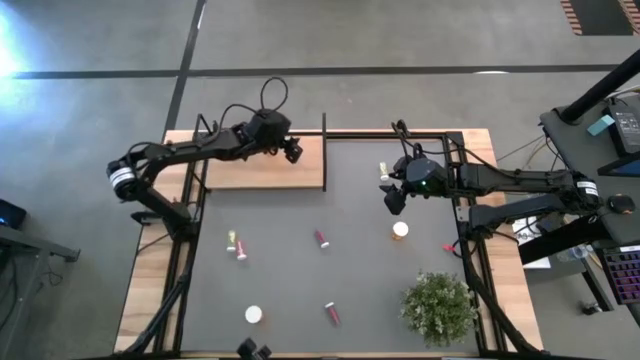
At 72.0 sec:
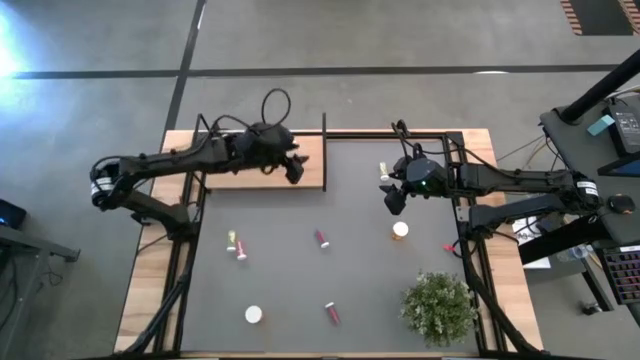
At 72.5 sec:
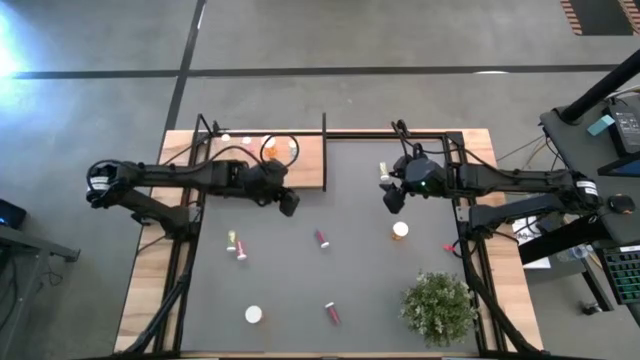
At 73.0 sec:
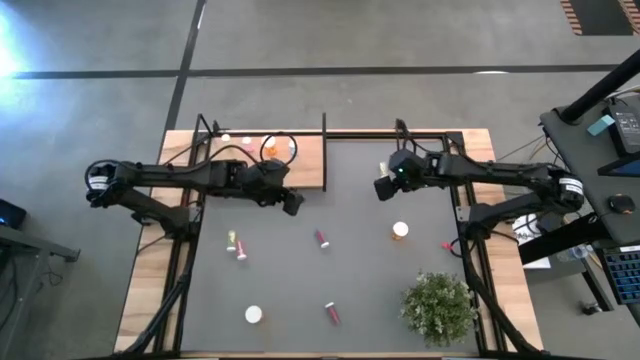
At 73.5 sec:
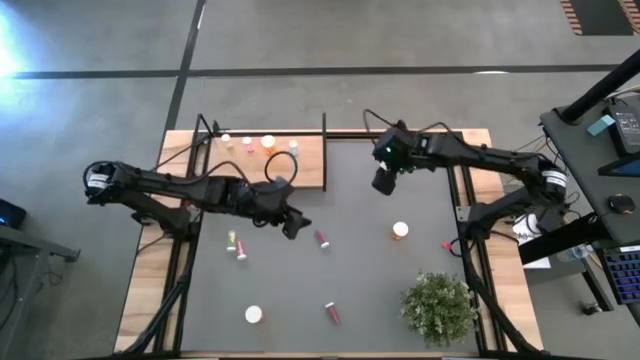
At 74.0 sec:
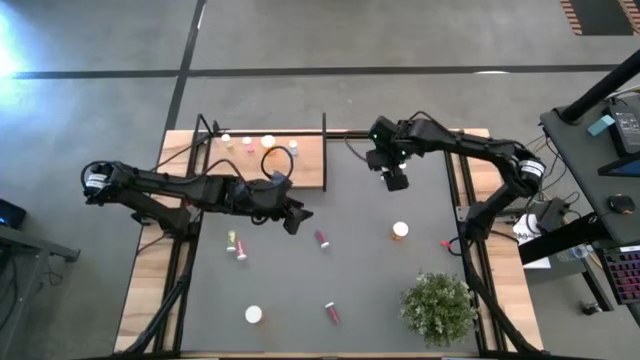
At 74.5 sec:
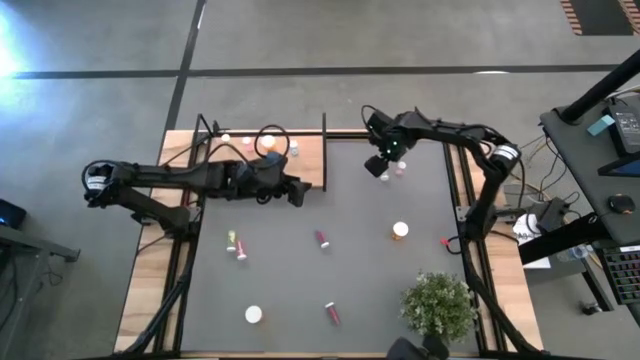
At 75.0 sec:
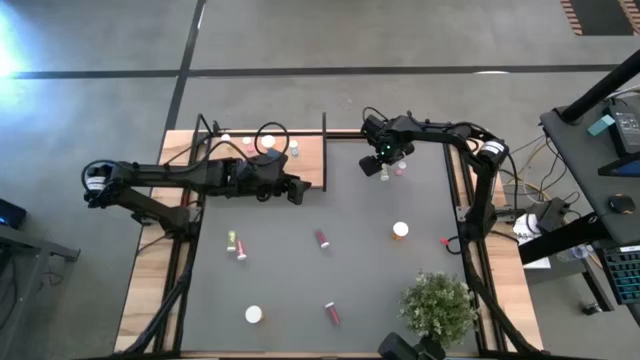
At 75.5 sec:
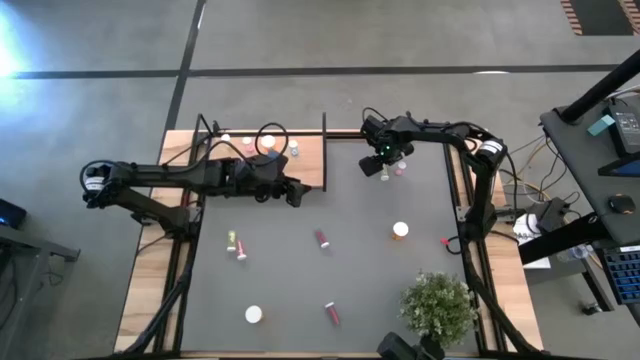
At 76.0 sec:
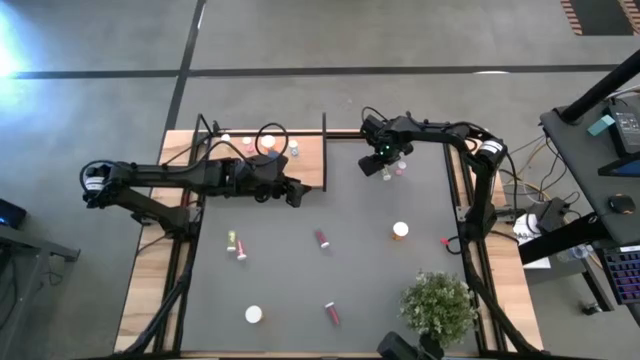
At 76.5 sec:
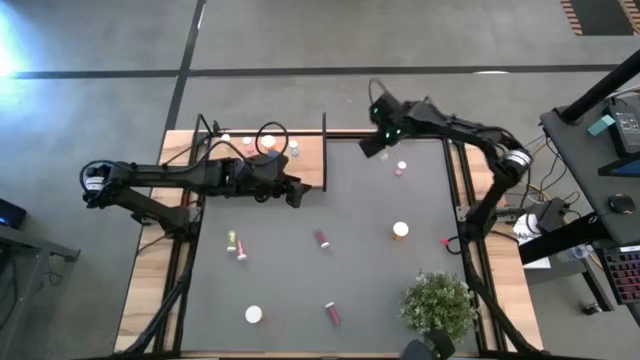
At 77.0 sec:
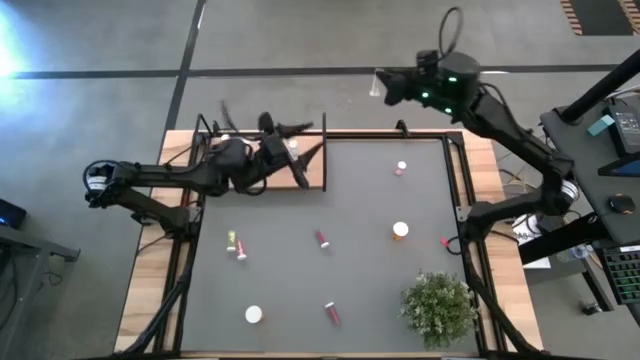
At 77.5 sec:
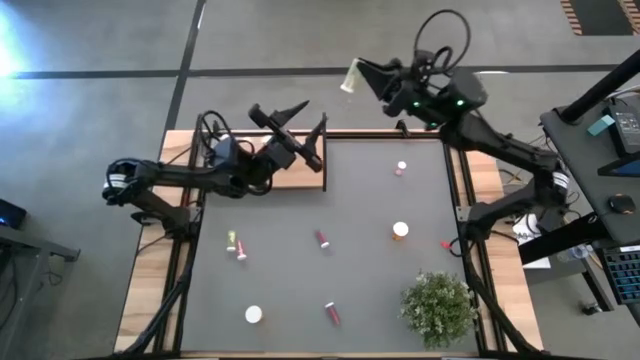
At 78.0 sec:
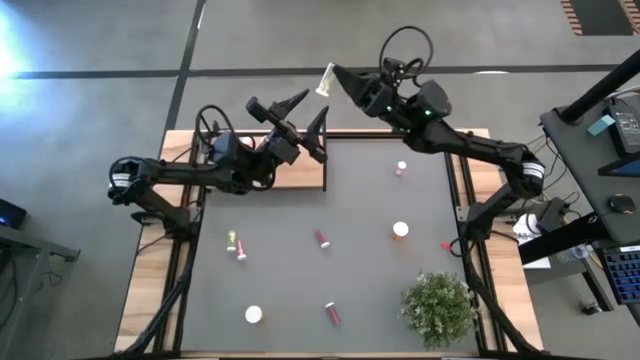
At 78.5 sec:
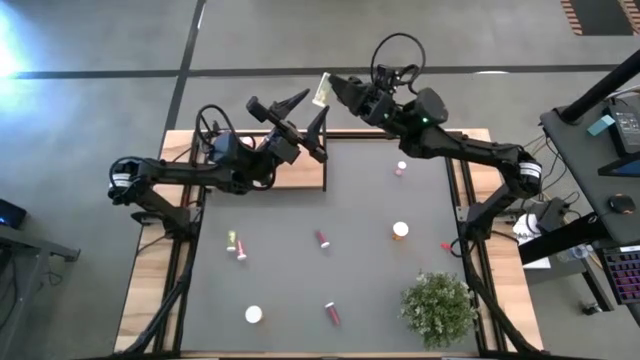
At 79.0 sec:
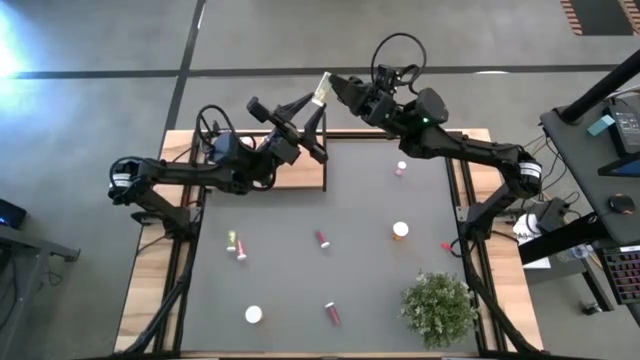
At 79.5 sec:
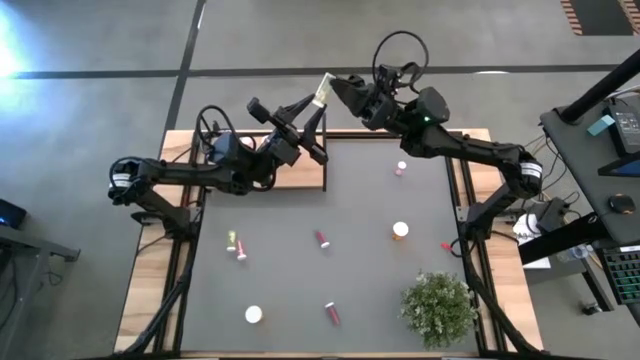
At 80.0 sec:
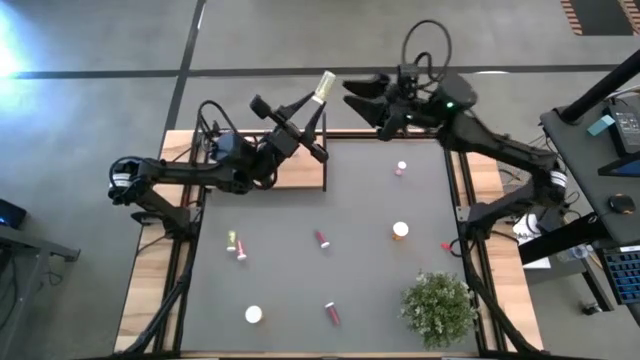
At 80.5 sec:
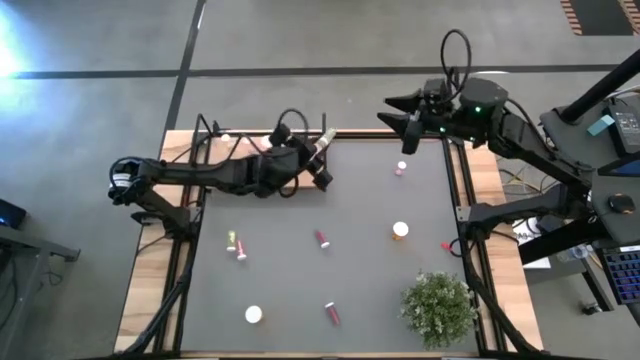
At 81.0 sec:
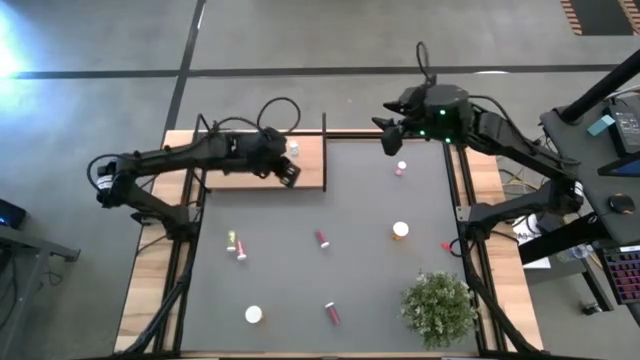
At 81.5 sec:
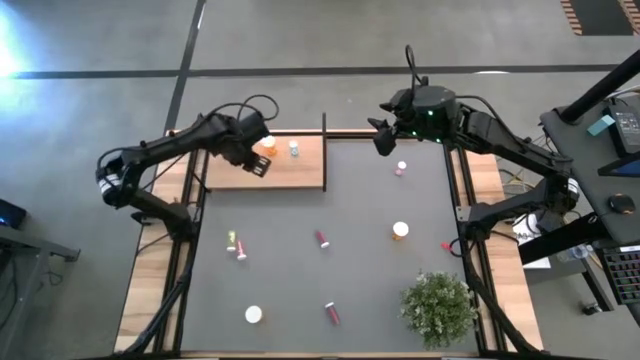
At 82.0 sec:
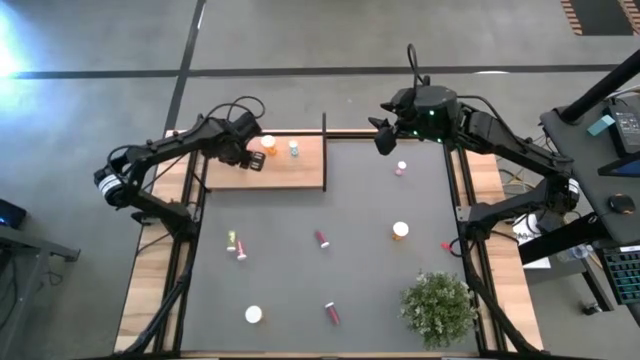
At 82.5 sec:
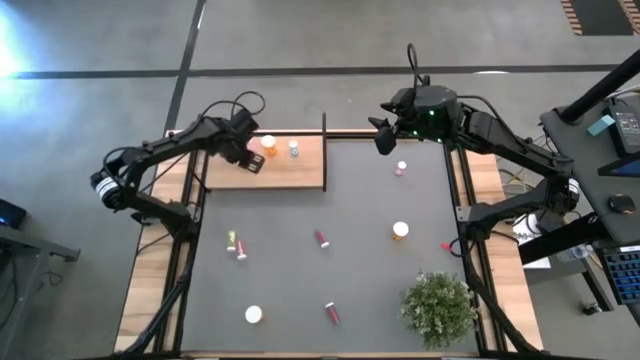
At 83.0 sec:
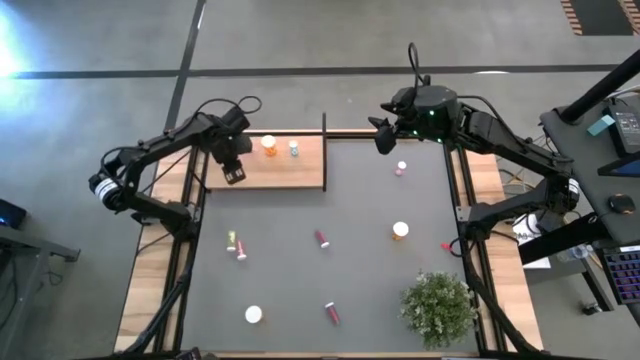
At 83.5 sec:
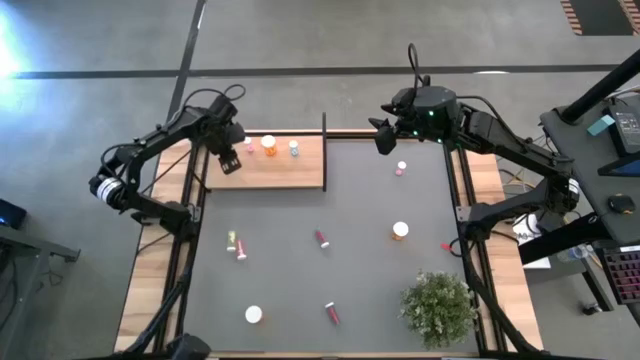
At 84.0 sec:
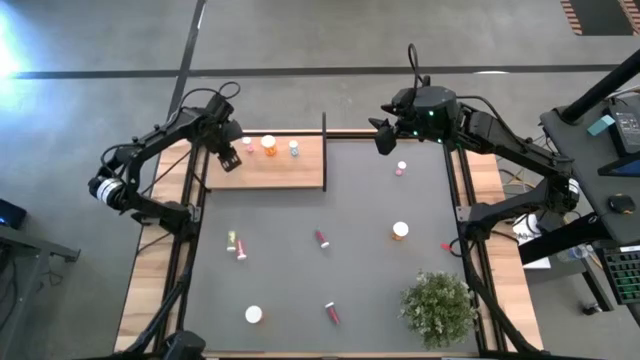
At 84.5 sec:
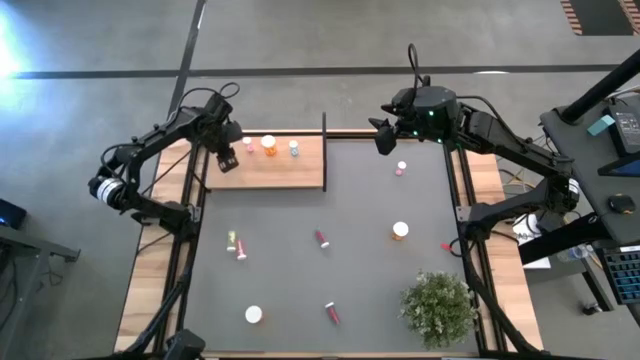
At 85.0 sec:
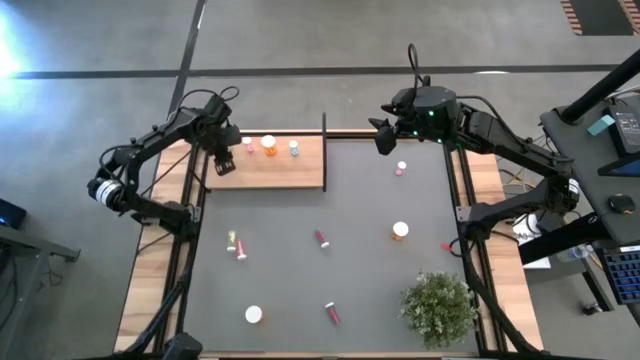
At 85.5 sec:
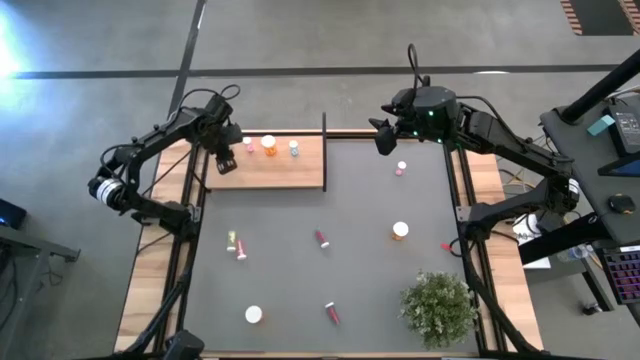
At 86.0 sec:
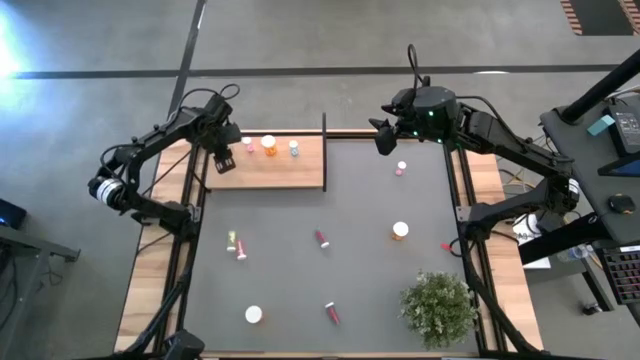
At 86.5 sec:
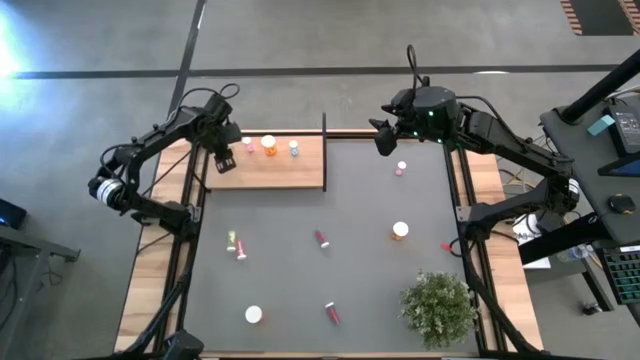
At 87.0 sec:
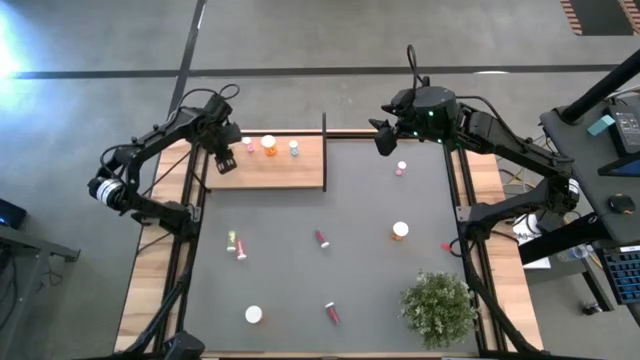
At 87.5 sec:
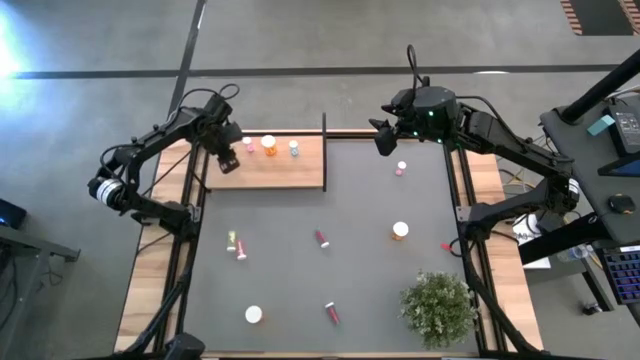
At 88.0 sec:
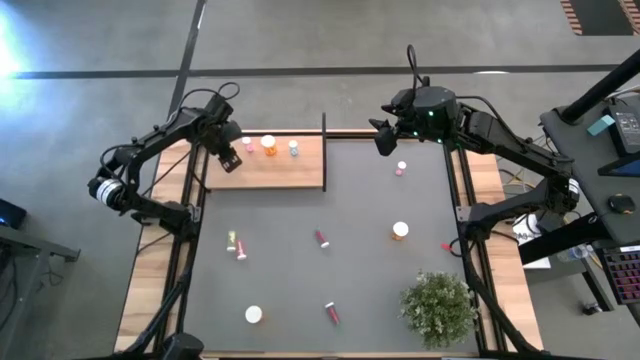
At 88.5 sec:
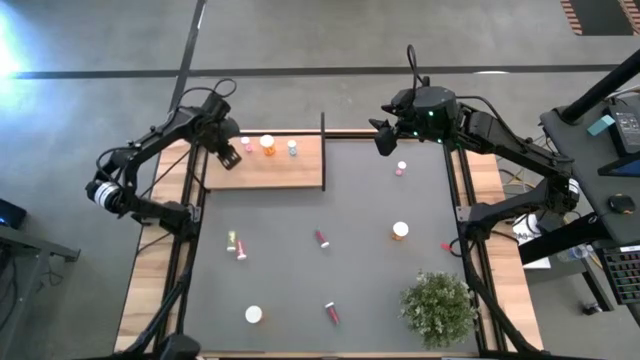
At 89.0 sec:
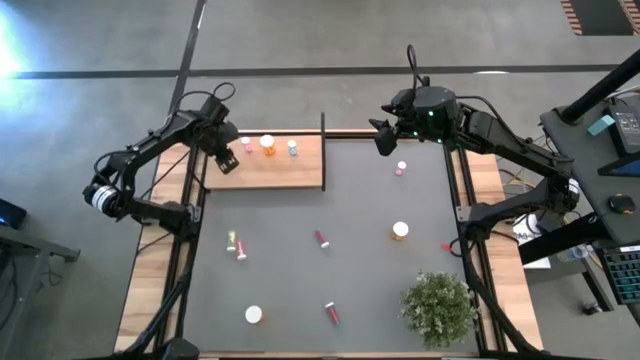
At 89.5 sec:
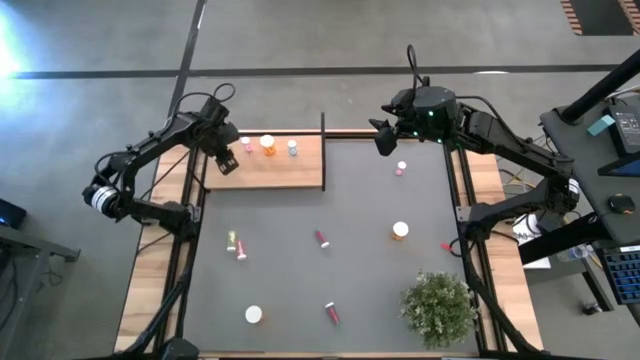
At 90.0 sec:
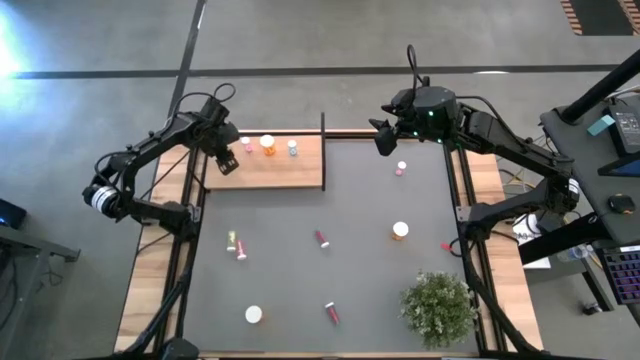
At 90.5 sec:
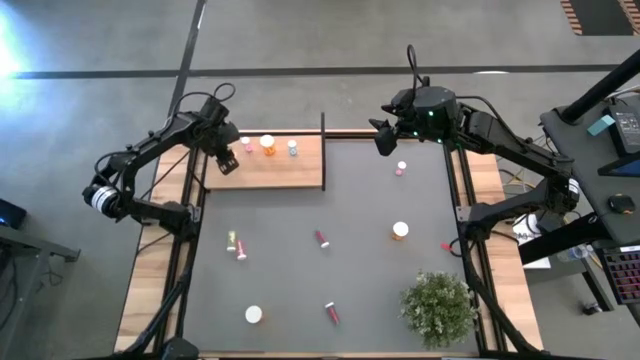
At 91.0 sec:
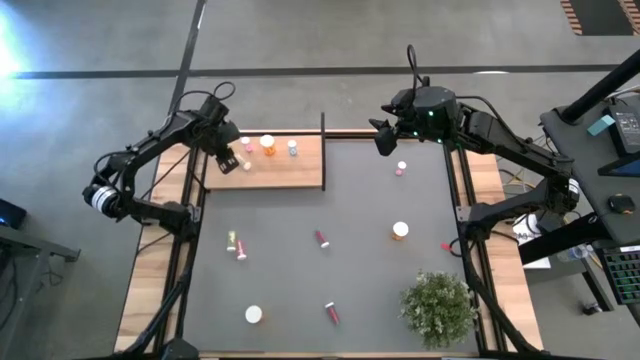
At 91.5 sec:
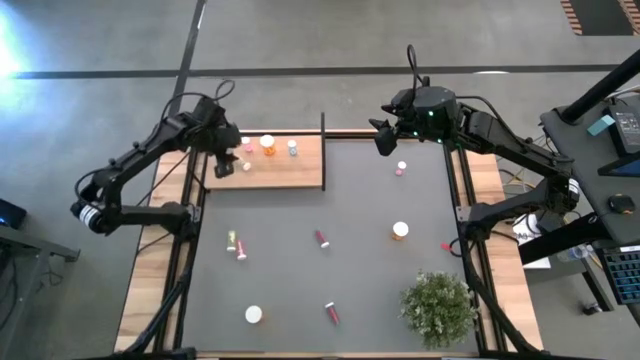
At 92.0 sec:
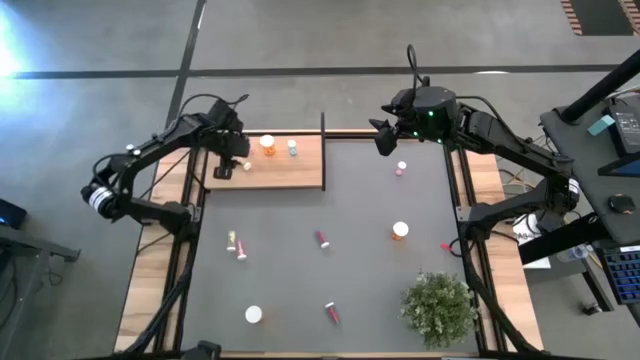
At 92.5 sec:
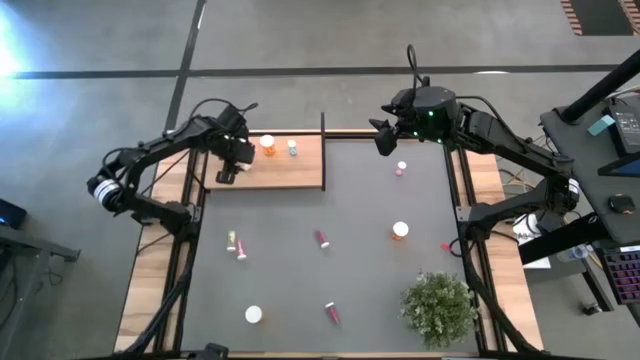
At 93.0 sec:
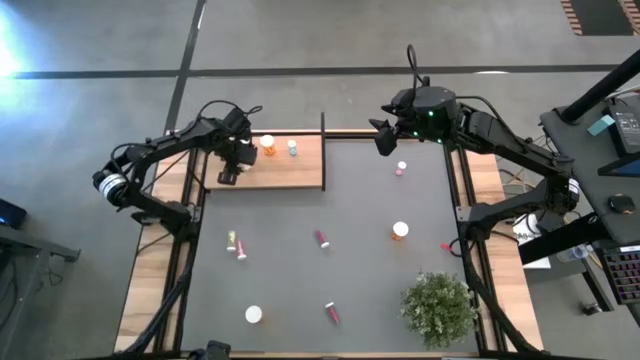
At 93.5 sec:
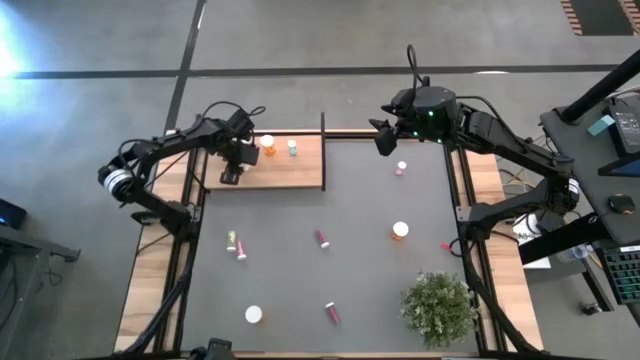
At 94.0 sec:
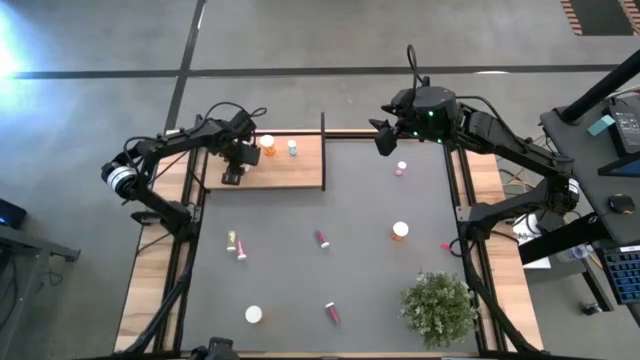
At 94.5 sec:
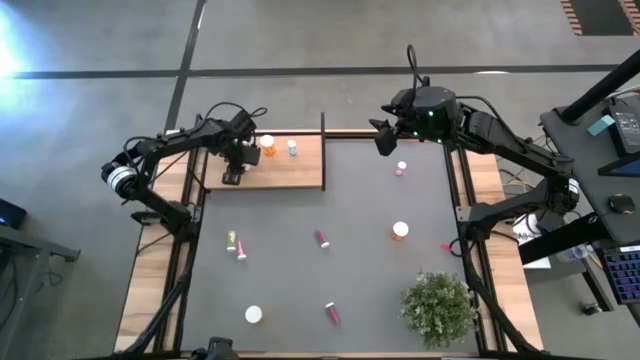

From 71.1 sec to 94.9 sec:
Task: Pick and place medicine bottles onto shelf by color
Put the right yellow pill bottle on the shelf aligned with the other yellow pill bottle
